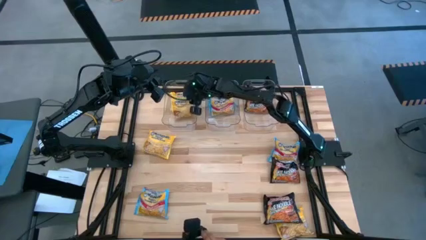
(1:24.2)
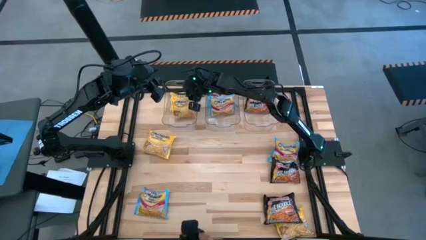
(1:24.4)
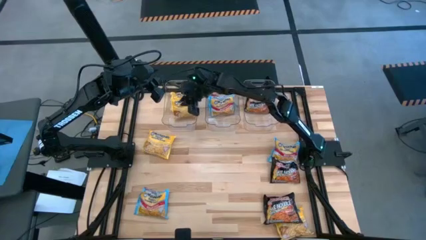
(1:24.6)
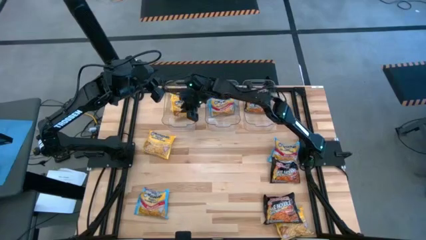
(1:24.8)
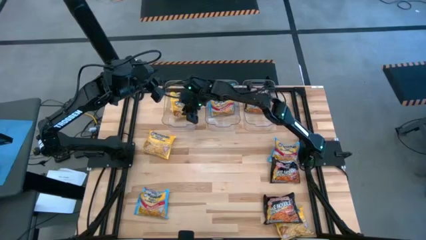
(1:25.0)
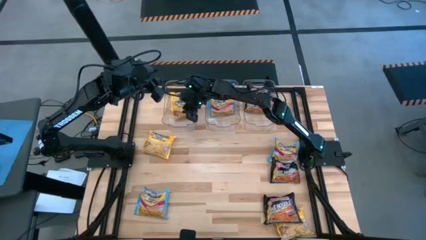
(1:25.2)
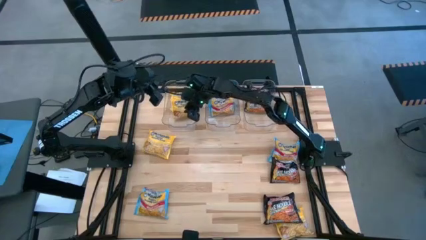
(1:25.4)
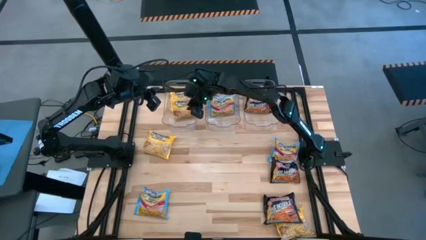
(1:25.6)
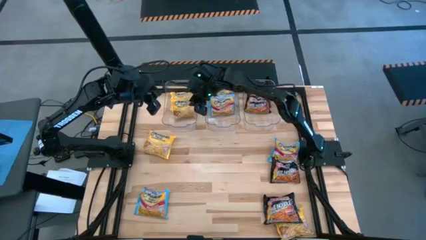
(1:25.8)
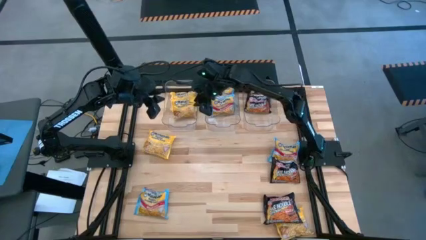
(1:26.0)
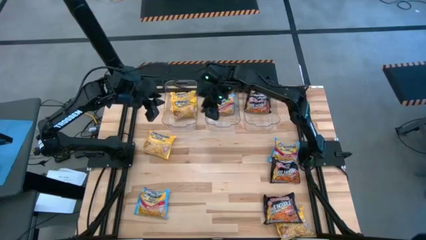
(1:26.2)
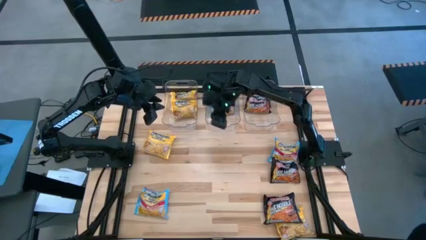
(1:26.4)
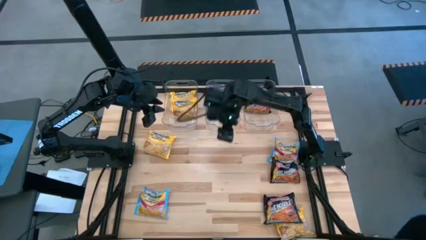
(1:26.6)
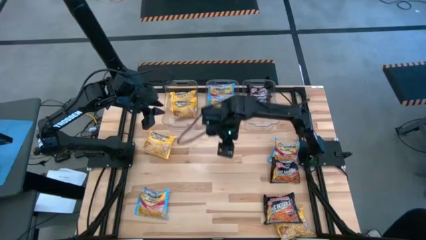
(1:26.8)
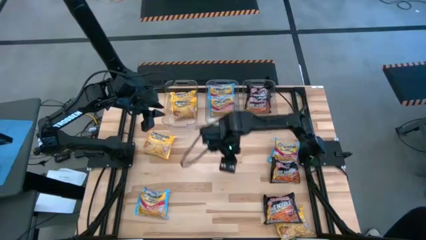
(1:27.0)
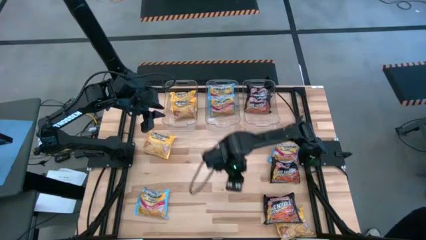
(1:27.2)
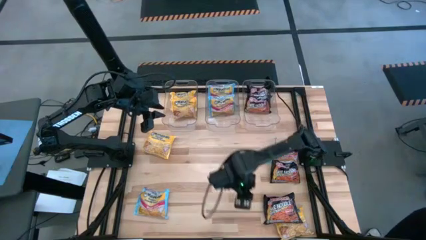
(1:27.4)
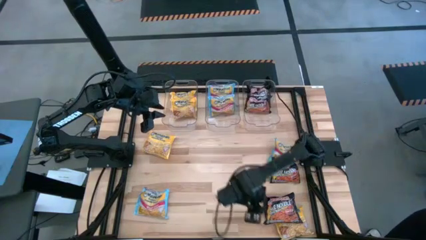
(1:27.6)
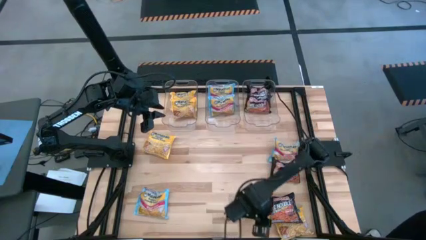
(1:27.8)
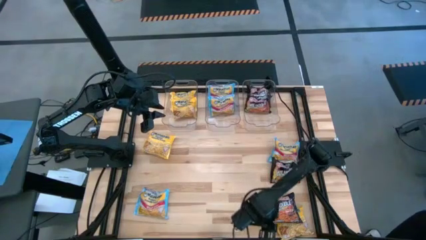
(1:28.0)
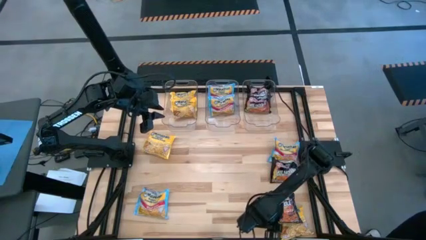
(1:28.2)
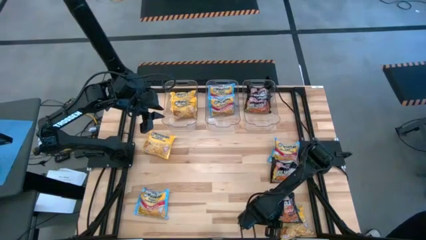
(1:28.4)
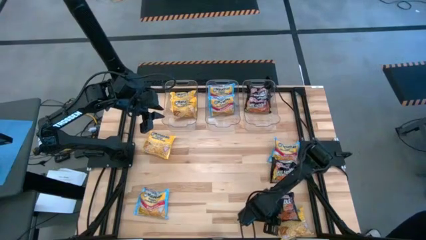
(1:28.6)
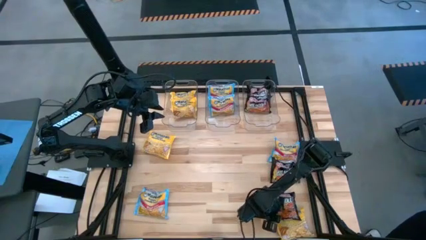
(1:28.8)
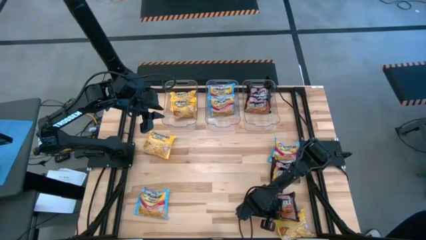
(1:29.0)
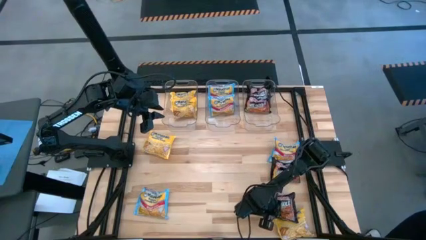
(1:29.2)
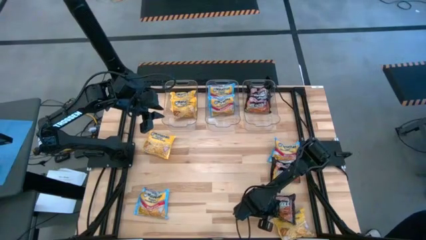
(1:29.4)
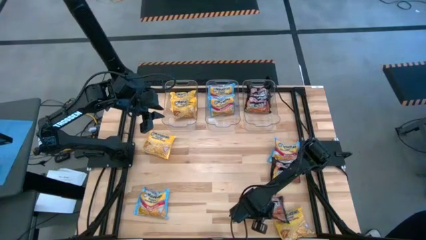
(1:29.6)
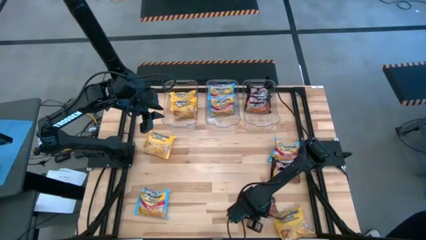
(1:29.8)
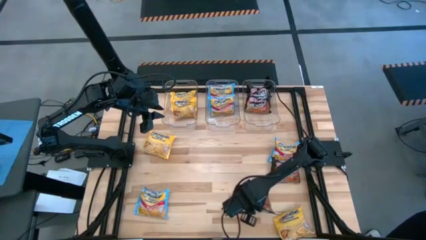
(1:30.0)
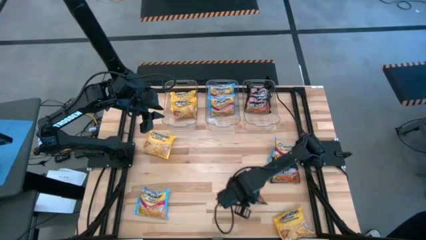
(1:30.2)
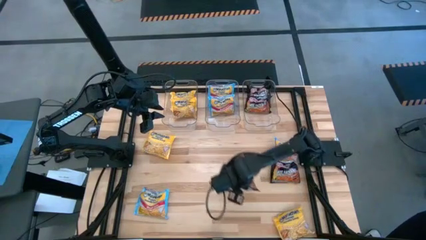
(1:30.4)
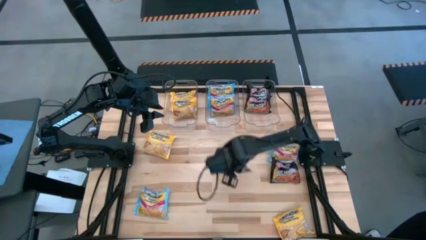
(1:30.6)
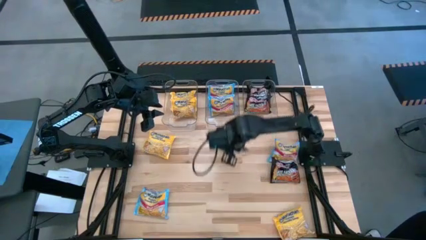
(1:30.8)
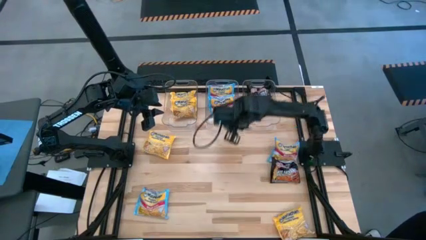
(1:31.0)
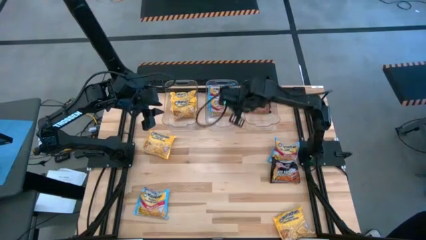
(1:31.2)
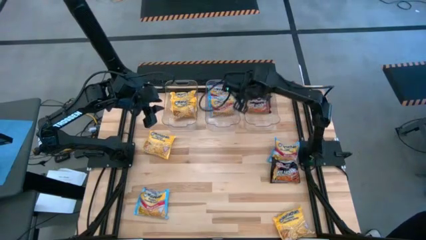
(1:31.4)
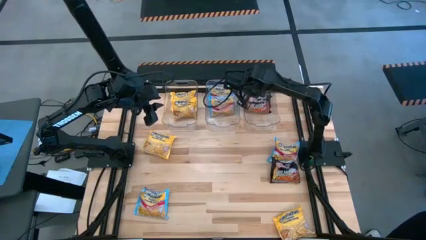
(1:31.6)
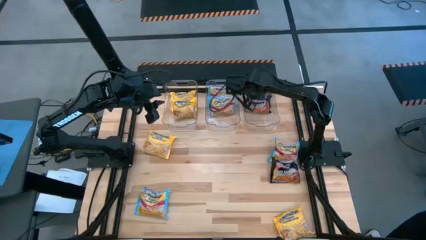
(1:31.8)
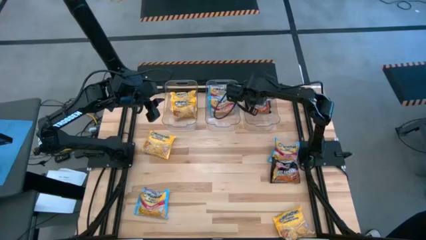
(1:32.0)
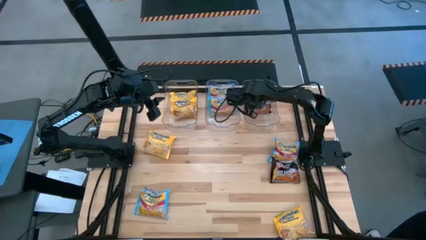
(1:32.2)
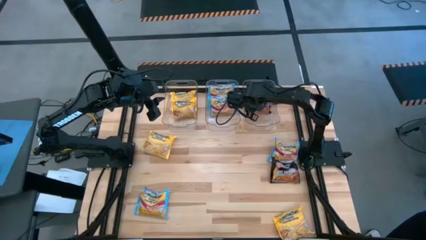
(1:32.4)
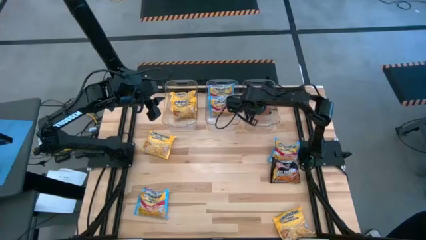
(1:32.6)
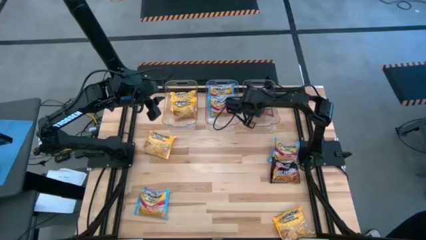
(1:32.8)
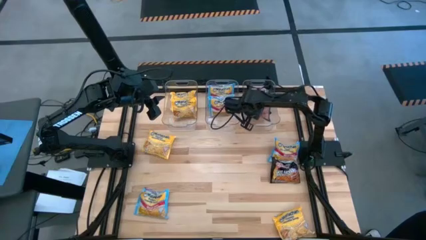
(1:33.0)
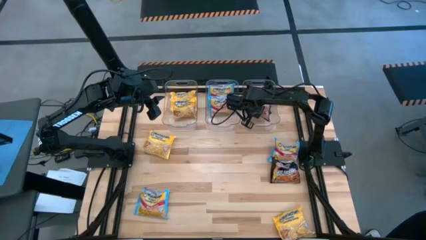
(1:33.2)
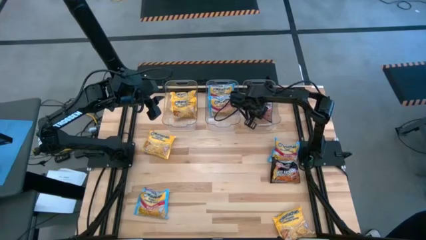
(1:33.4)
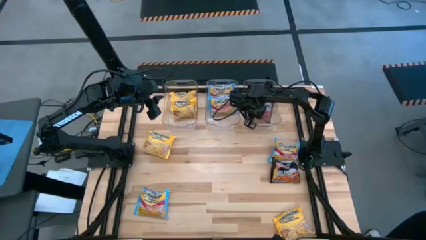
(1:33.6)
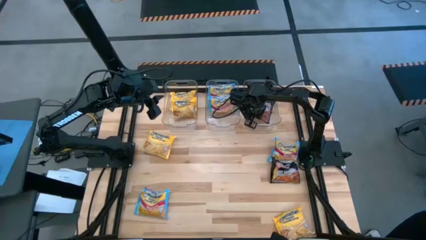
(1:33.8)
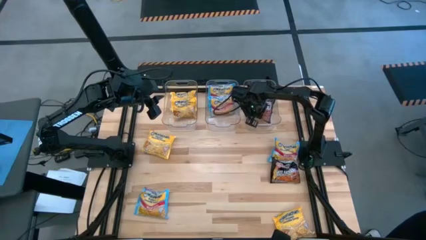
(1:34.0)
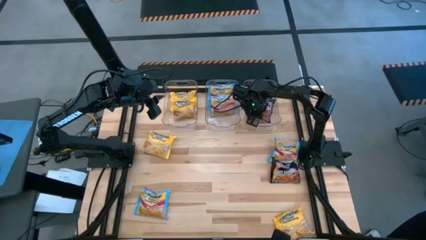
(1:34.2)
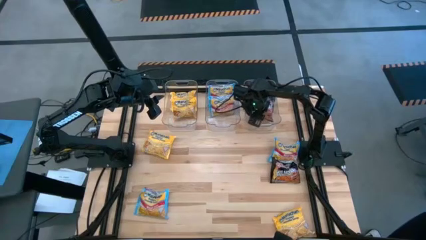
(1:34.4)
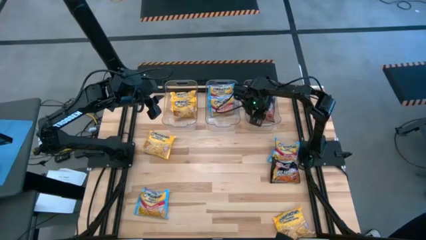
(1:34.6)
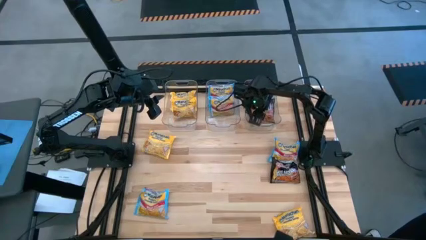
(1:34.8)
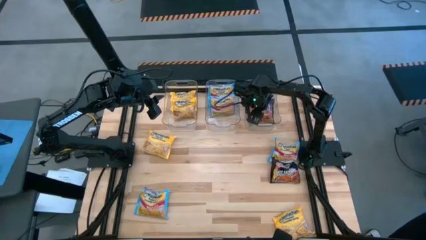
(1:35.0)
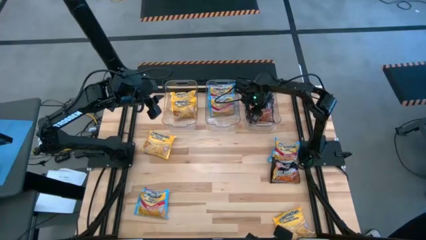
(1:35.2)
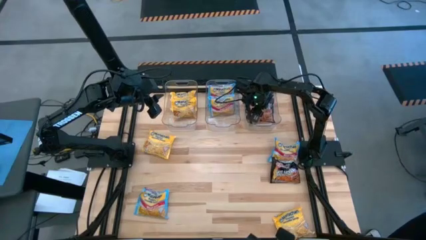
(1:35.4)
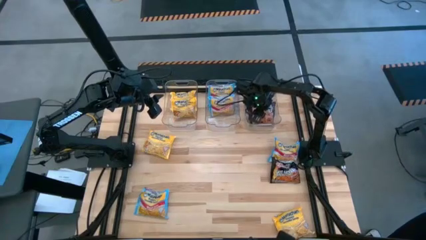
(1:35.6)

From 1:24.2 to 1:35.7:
Task: Sort Maruchan noodles
Put the black noodle pack into the right transparent bin

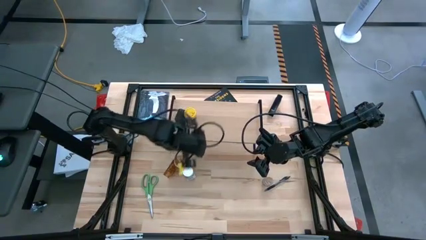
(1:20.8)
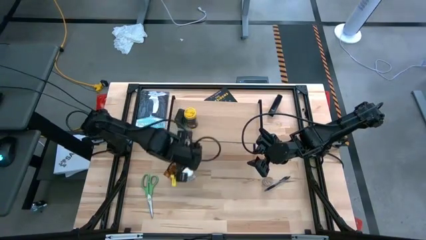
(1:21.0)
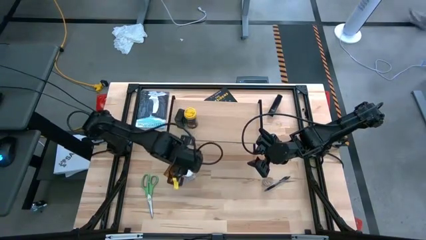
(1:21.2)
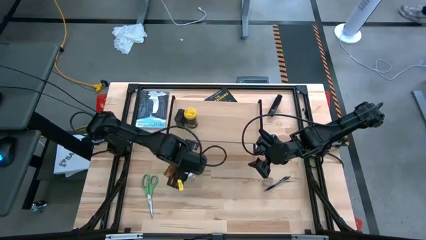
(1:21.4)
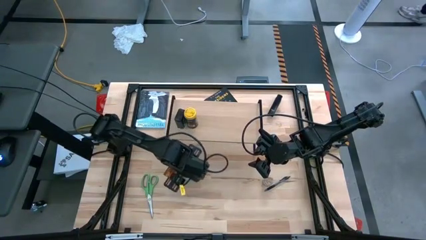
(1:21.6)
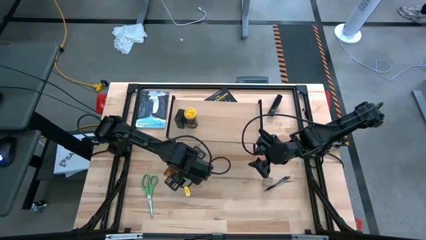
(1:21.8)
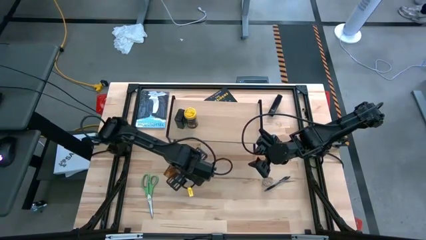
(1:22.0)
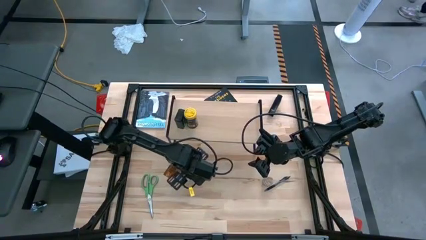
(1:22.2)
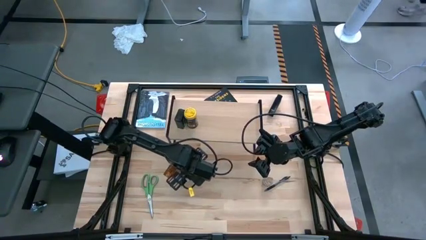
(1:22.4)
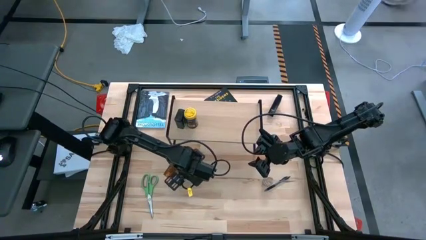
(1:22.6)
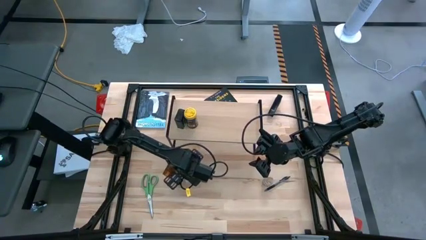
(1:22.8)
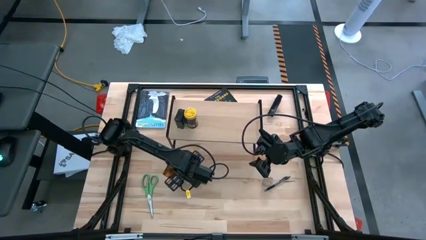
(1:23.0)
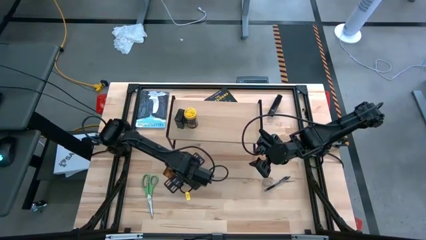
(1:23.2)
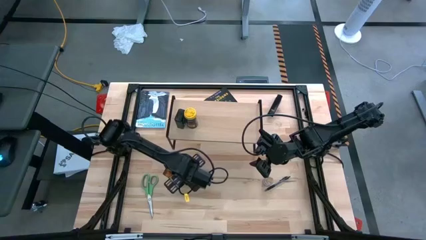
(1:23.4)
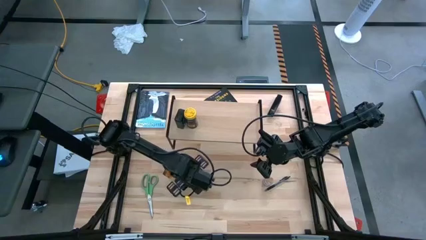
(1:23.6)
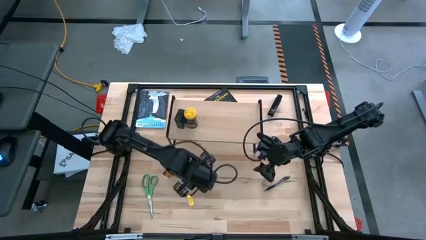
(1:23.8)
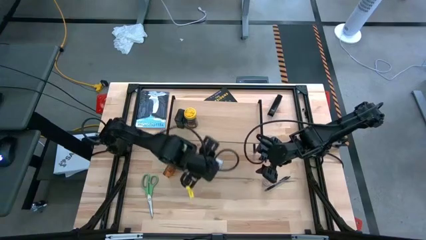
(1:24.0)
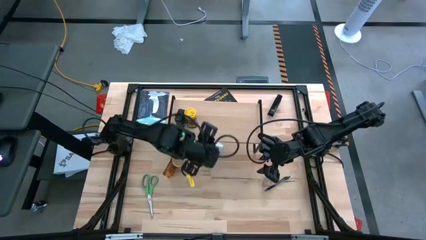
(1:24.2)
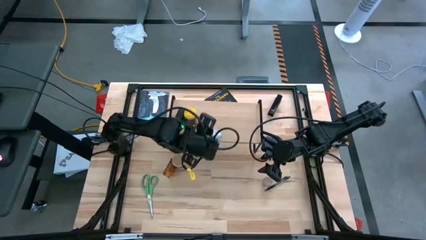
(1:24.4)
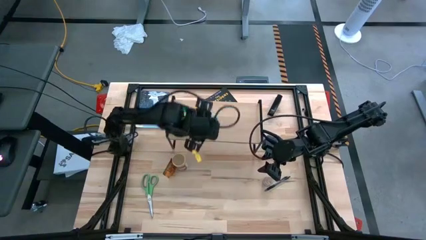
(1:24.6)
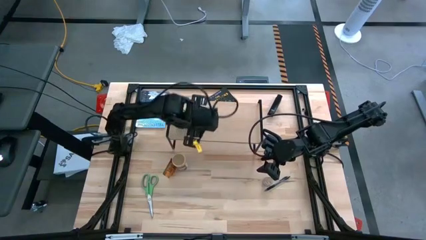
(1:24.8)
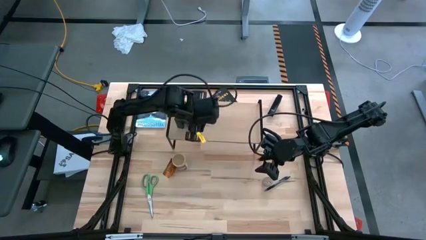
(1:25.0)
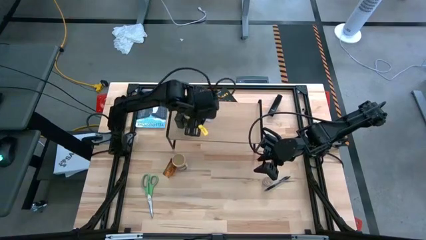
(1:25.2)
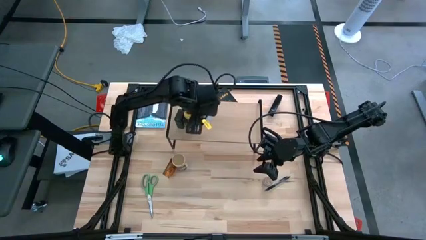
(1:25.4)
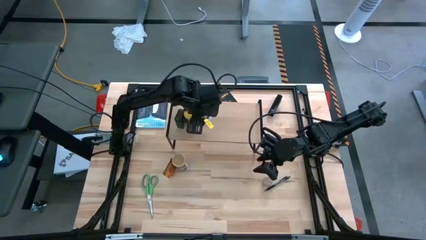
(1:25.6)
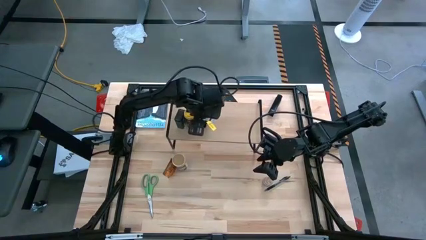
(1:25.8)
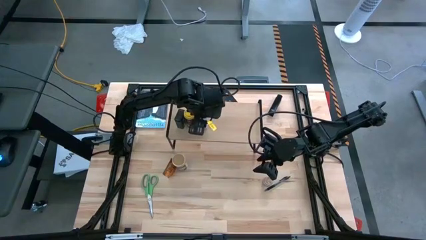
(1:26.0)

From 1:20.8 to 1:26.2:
Task: Shelf spices
Put the white seasoning bottle on the shelf
